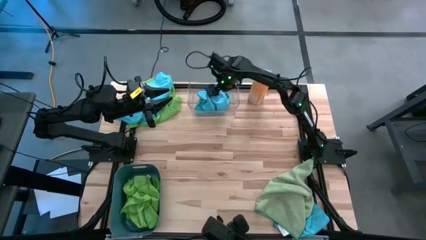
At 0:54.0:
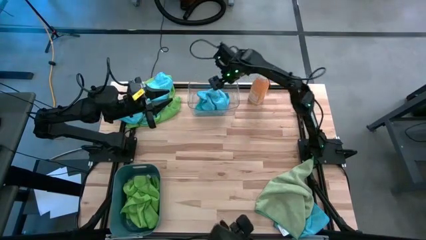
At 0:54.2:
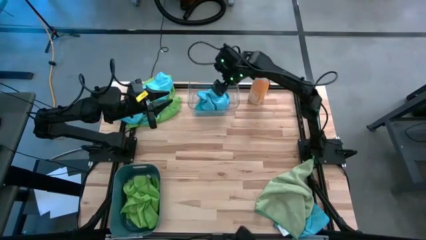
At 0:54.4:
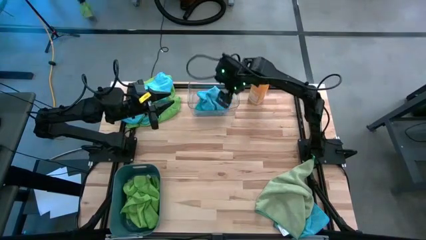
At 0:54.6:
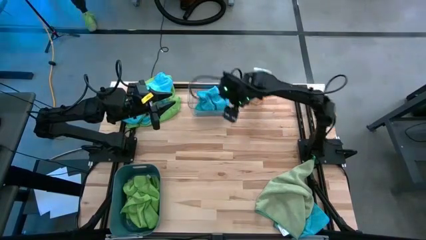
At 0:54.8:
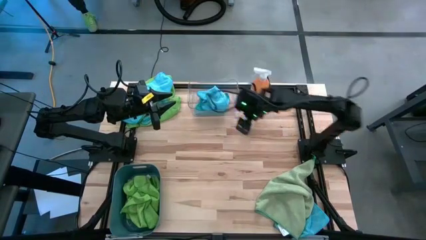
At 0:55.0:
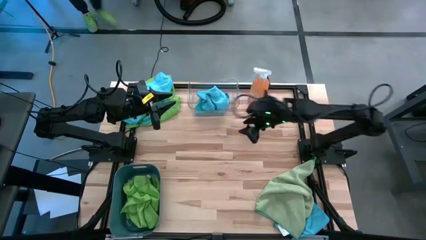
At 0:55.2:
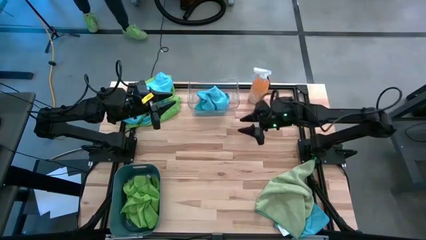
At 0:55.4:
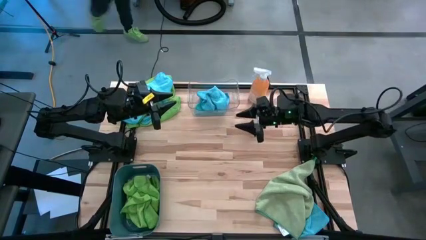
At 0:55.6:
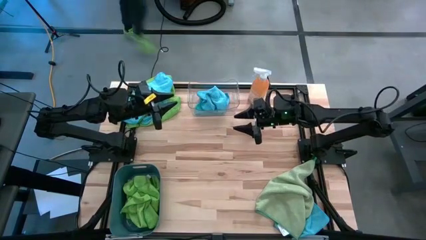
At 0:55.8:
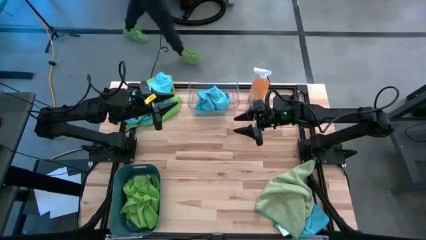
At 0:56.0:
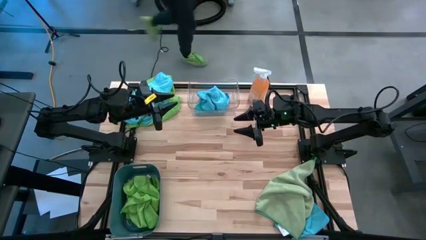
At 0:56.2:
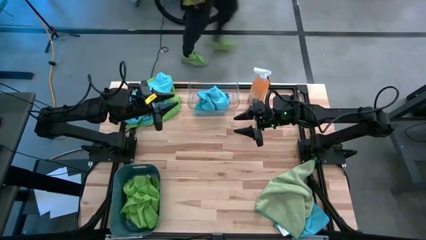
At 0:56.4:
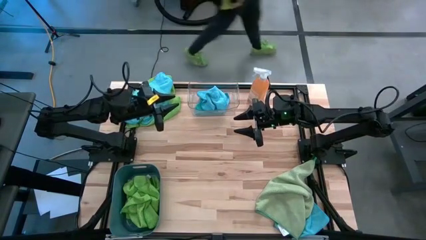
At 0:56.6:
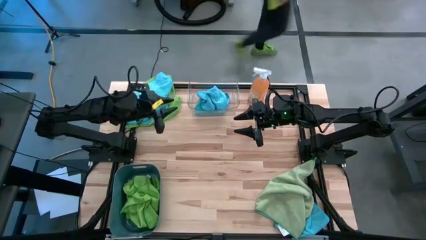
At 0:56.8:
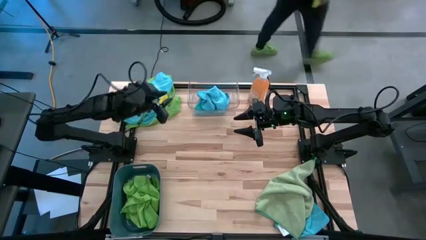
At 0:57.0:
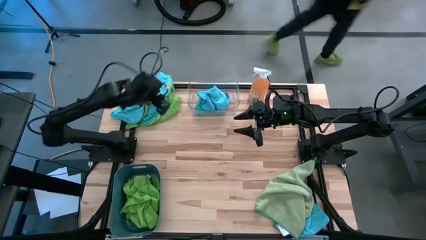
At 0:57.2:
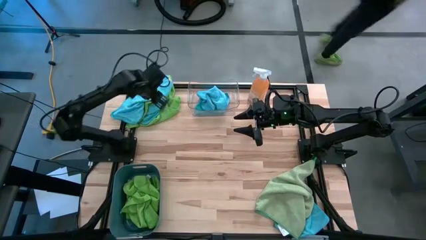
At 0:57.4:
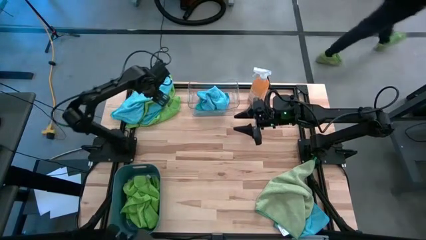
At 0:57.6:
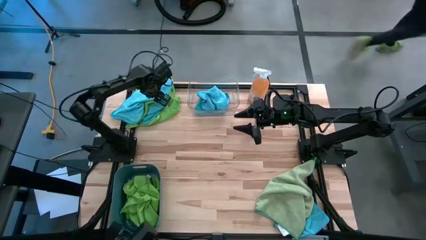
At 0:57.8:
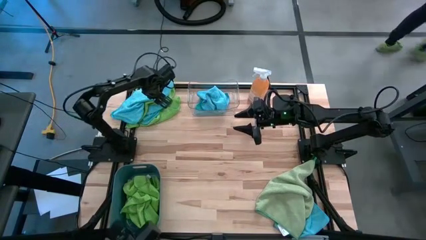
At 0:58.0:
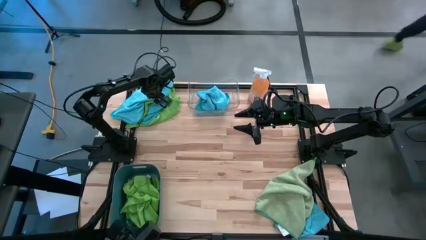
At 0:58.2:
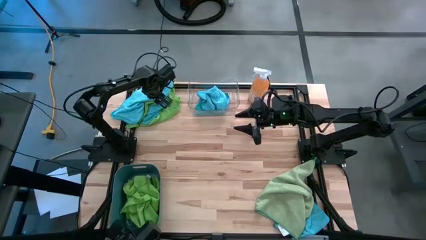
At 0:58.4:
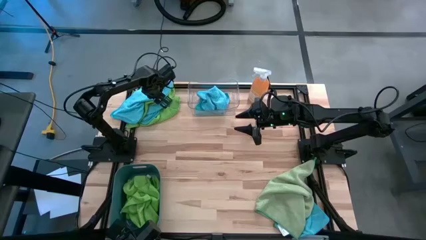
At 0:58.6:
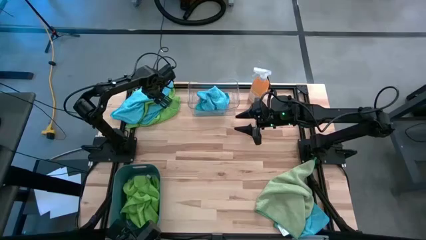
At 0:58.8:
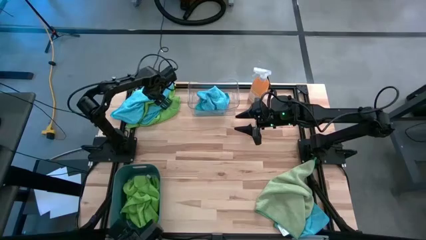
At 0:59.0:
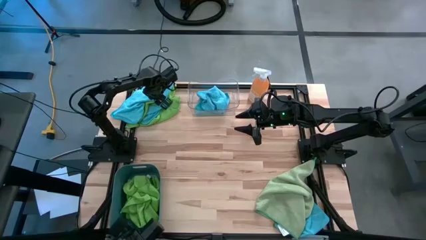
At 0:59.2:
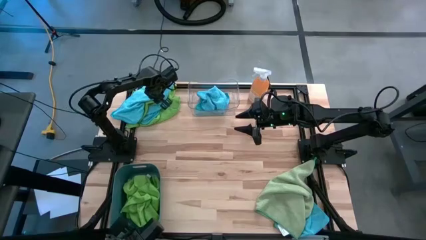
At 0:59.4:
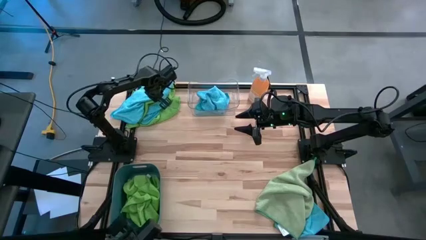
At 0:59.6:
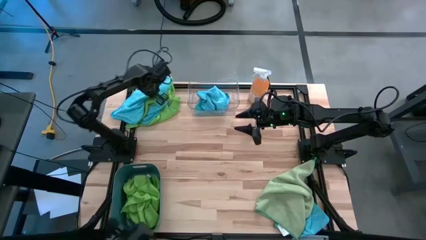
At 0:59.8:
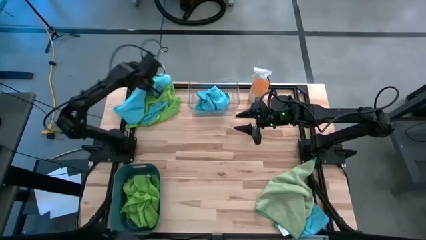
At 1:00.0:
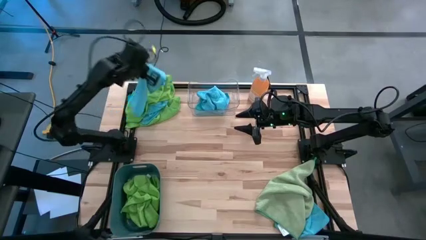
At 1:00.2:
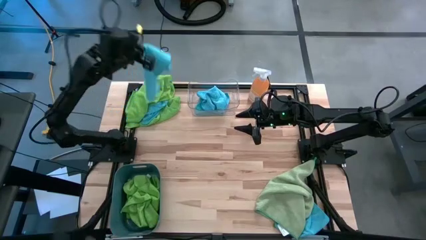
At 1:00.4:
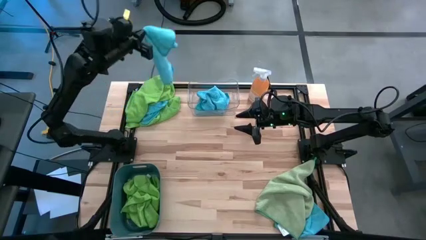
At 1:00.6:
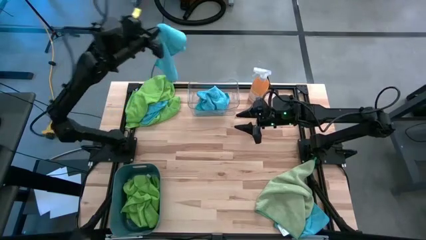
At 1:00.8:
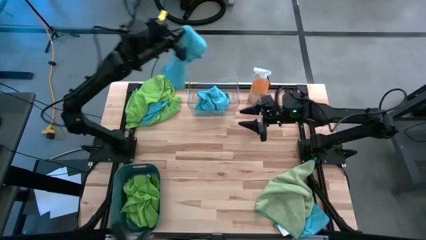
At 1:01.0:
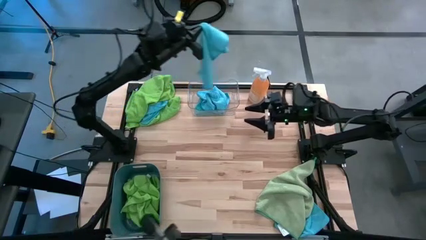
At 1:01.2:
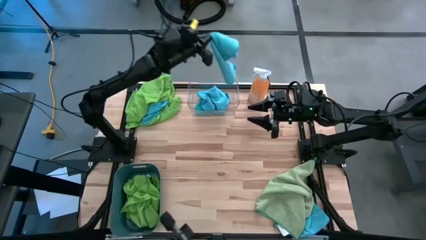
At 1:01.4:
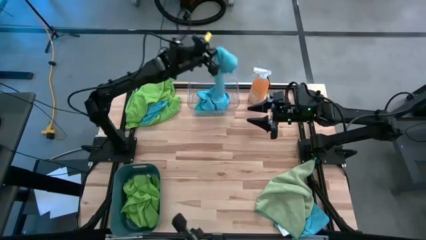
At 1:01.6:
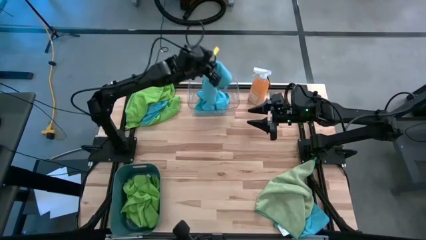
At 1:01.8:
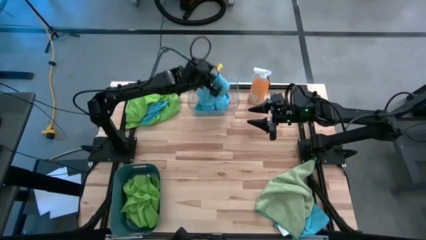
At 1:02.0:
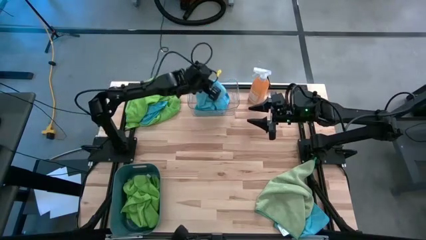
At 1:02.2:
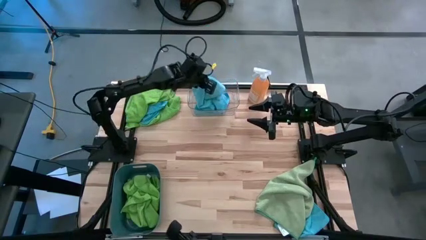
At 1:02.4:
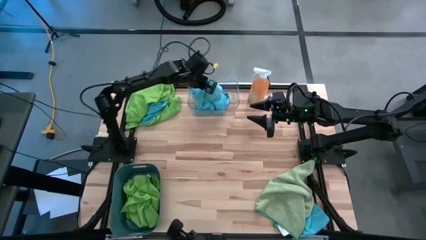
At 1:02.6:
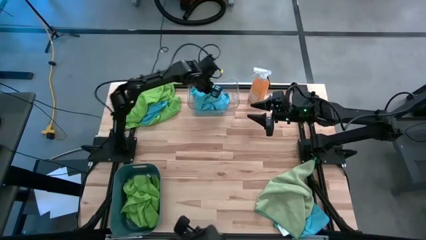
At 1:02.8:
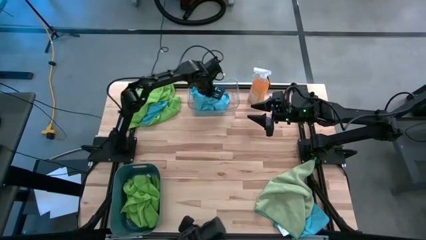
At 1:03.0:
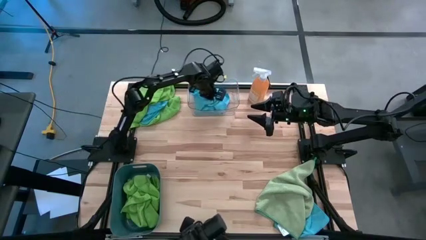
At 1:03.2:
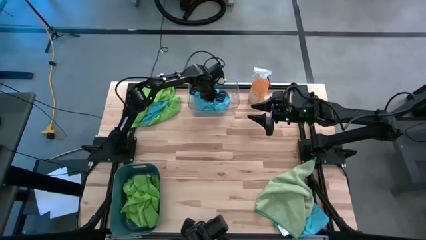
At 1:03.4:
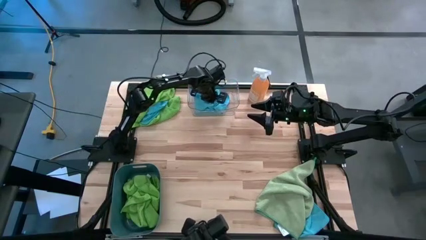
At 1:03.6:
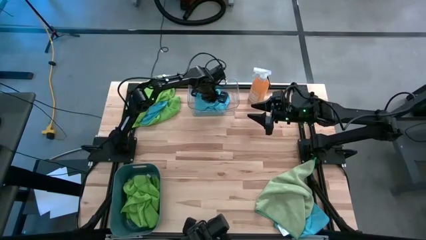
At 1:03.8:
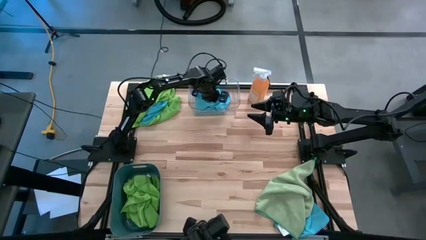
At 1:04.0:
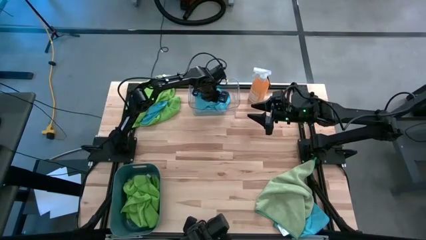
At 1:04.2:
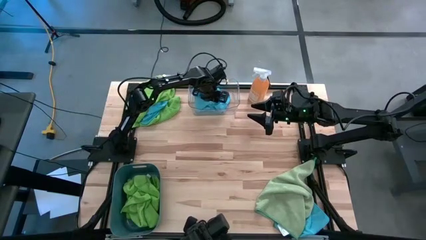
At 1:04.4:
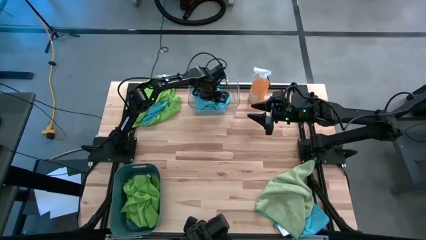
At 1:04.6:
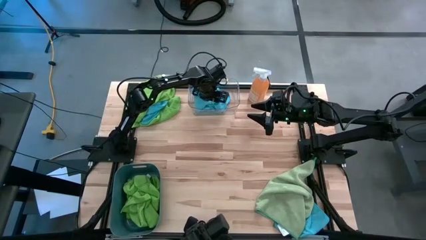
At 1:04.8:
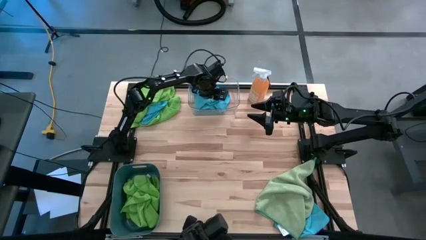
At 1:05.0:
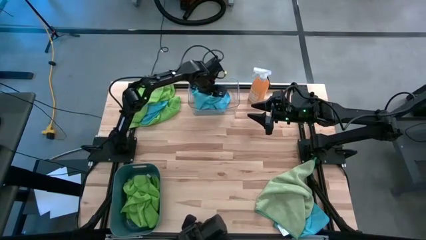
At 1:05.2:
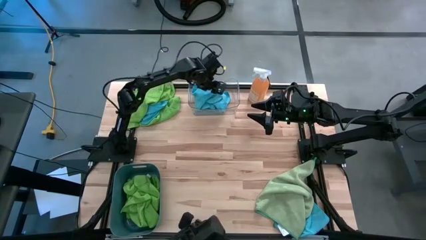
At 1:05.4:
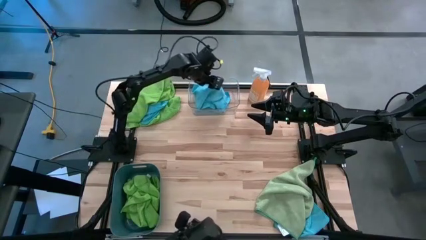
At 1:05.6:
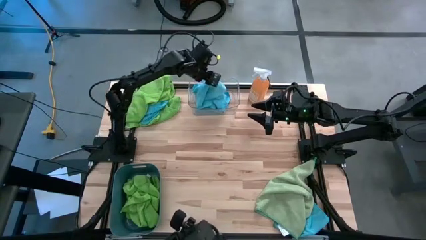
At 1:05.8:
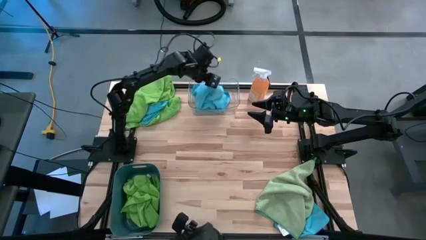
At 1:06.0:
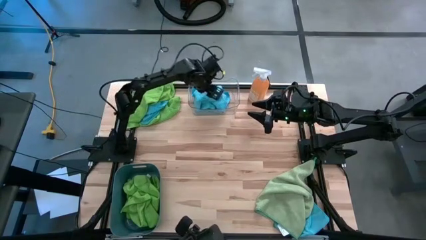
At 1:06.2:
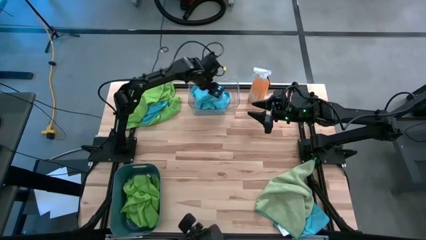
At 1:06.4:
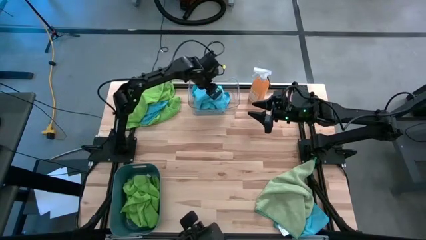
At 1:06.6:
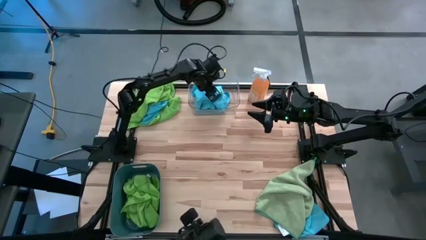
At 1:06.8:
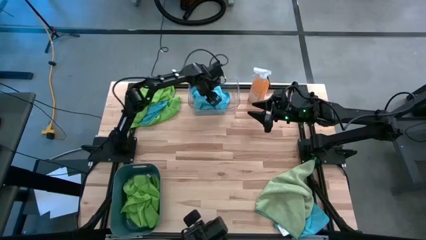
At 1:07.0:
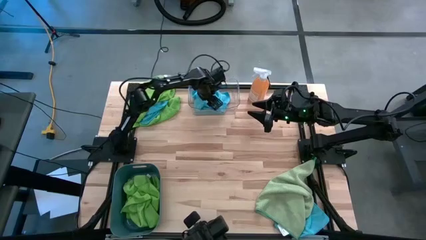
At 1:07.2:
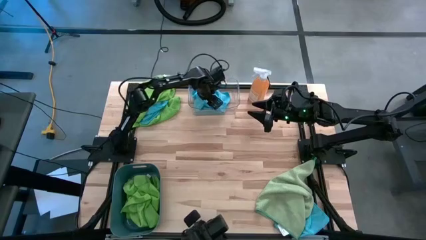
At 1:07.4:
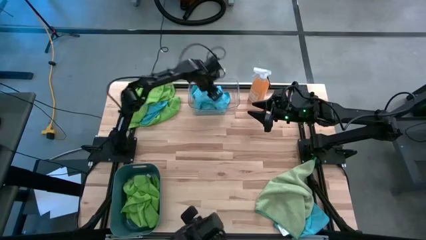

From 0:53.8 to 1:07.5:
Task: Sort microfiber towel by color & place in baskets
Put the blue microfiber towel into the transparent bin

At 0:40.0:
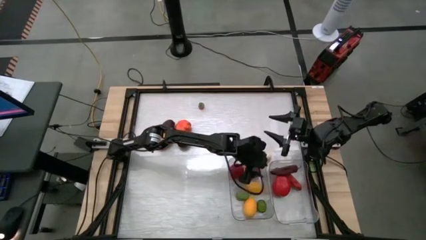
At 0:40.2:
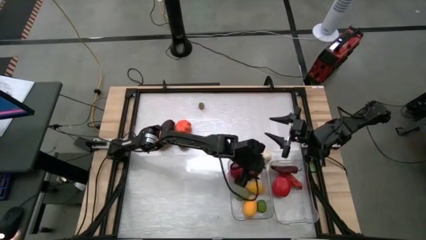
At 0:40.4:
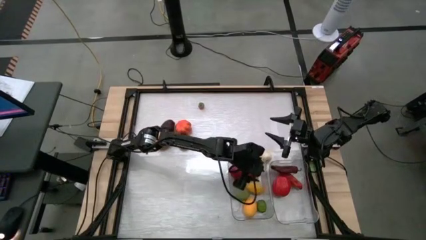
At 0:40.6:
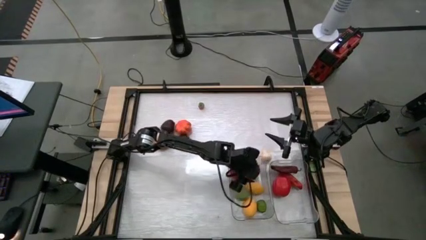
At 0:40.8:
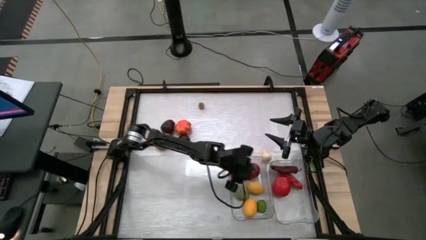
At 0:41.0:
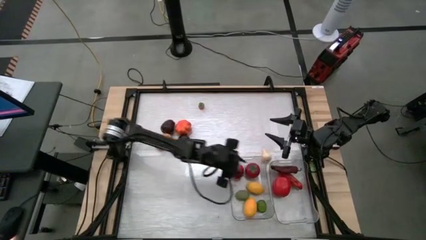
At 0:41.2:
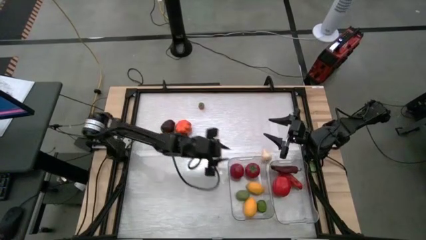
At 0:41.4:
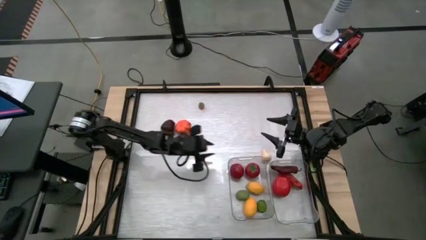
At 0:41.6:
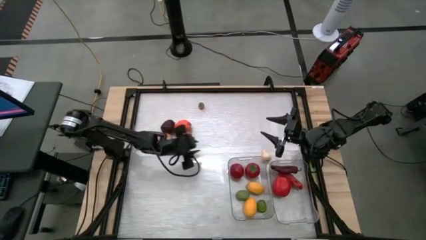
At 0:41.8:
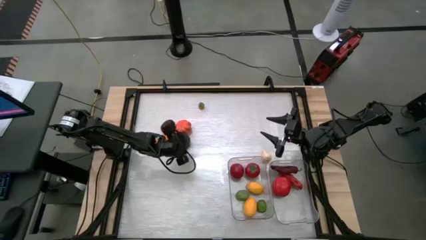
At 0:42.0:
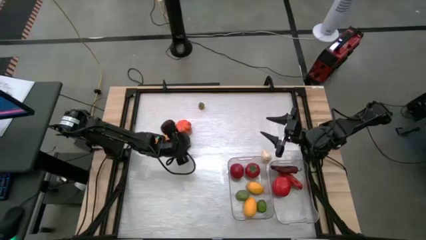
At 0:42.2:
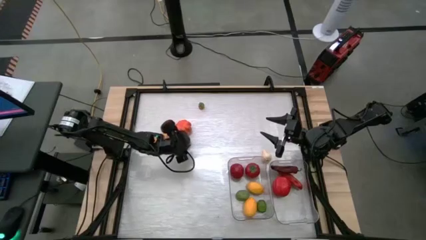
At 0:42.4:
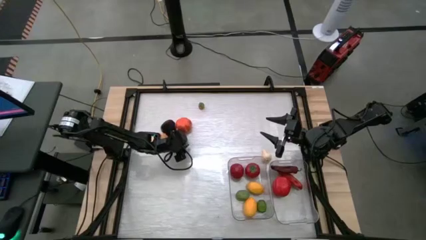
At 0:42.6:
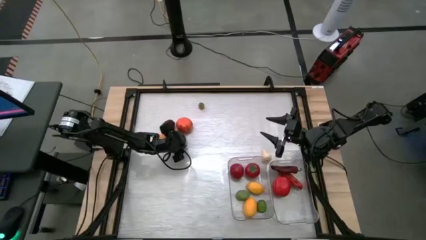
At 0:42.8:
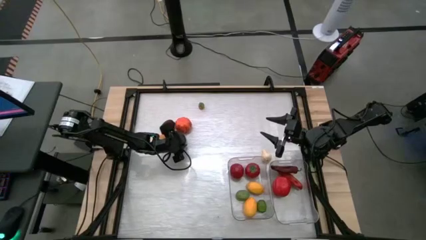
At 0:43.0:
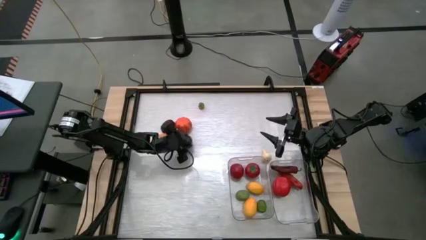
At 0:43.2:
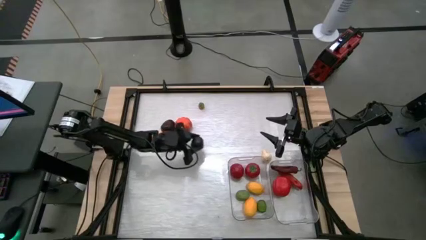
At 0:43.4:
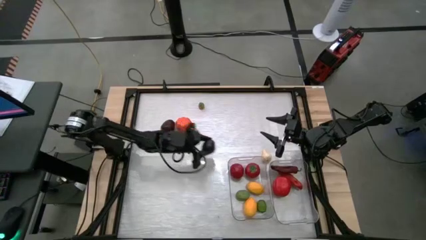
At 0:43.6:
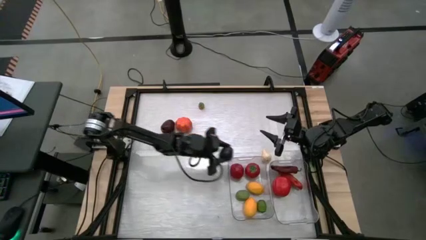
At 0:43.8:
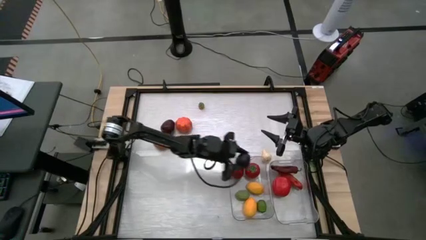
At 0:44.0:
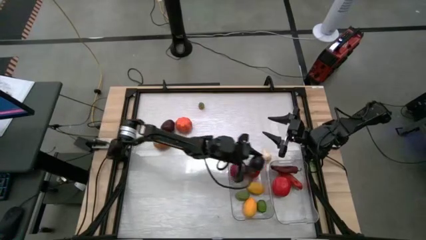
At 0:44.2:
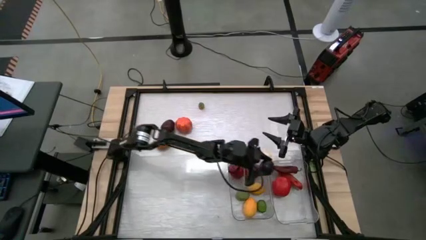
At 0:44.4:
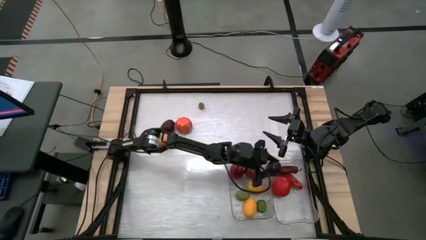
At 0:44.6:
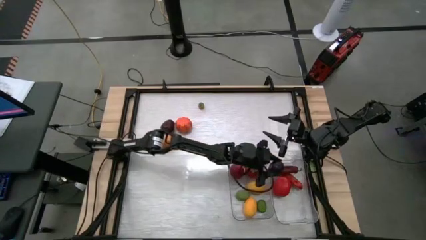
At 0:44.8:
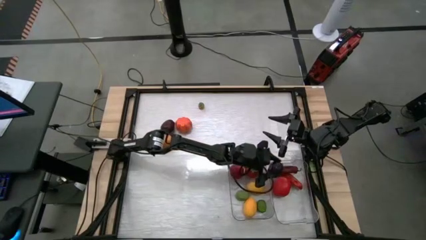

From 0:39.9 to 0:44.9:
Task: Sort produce into baskets
Put the plum into the right transparent bin
